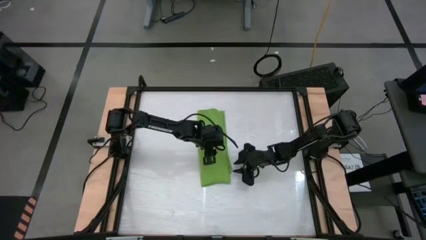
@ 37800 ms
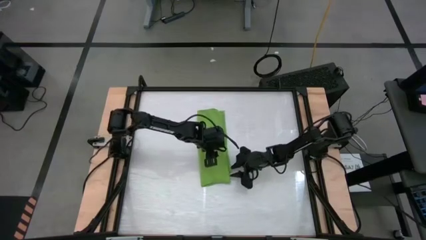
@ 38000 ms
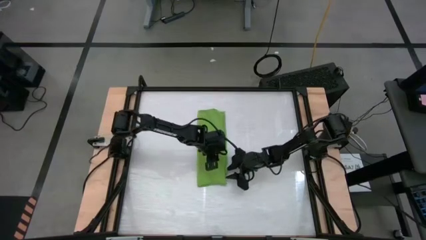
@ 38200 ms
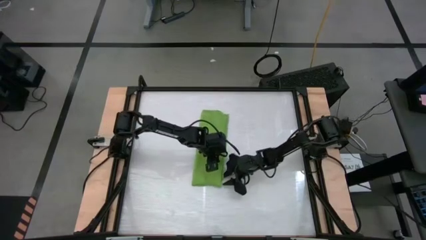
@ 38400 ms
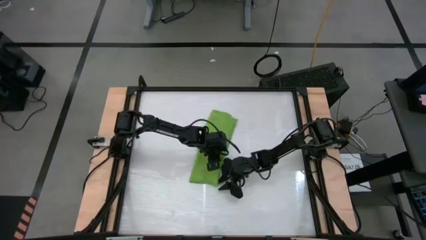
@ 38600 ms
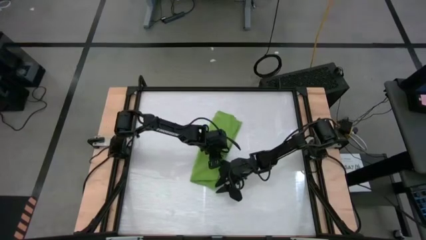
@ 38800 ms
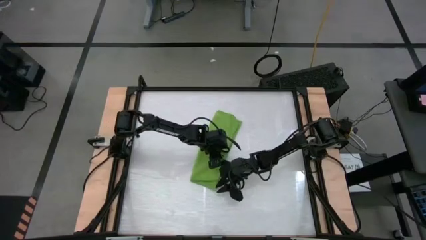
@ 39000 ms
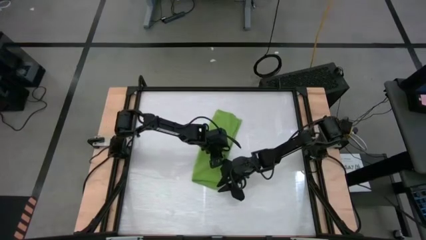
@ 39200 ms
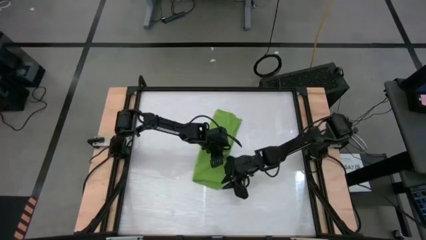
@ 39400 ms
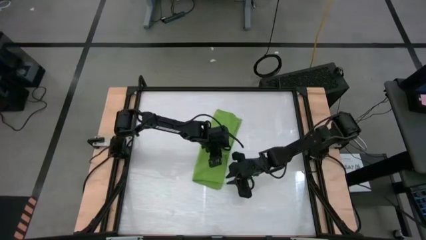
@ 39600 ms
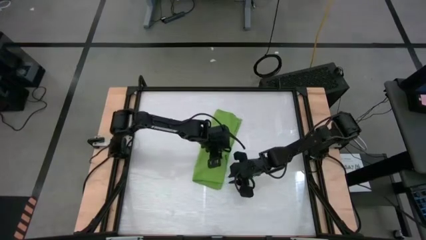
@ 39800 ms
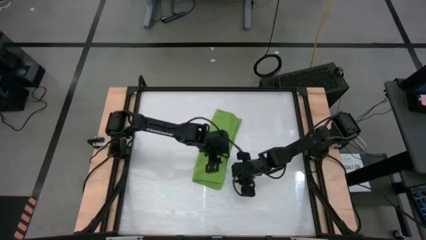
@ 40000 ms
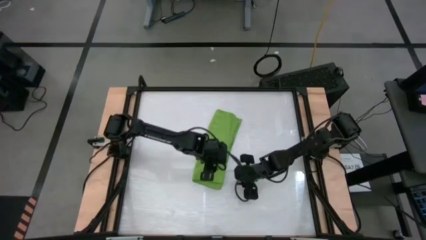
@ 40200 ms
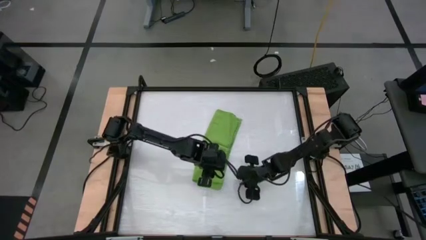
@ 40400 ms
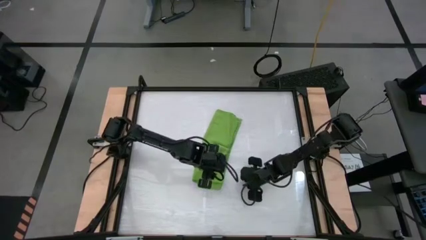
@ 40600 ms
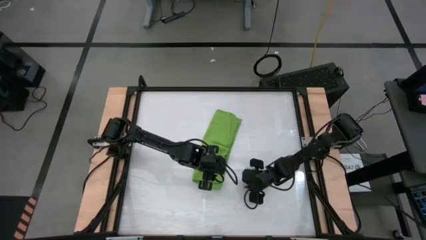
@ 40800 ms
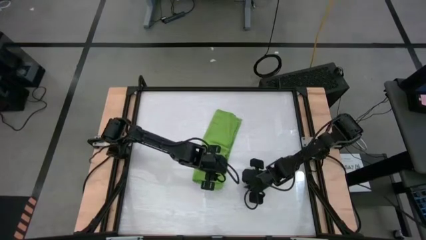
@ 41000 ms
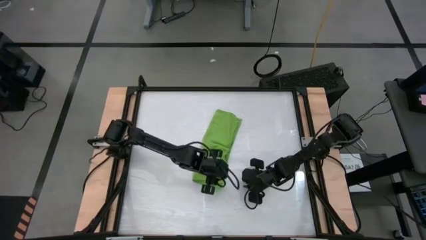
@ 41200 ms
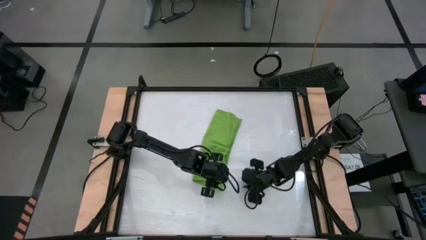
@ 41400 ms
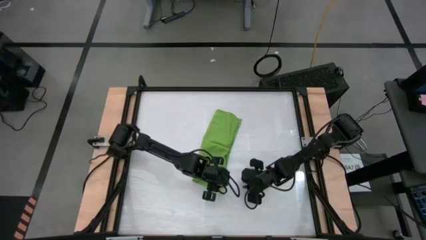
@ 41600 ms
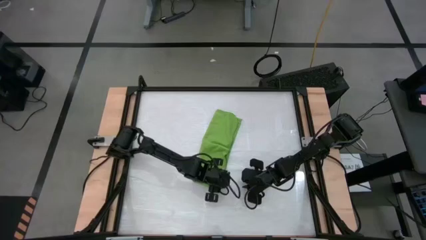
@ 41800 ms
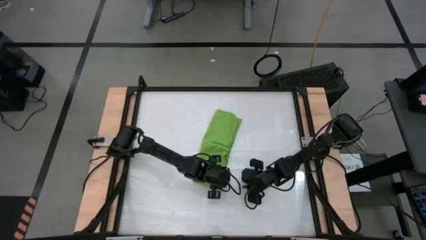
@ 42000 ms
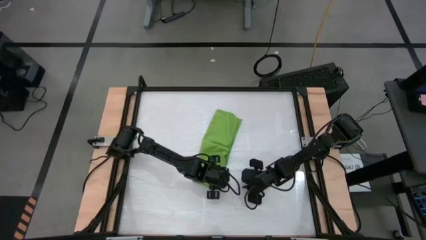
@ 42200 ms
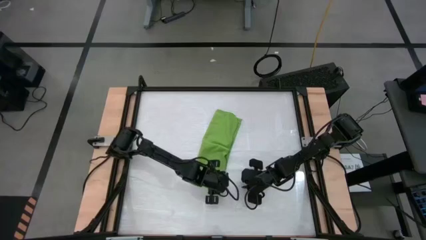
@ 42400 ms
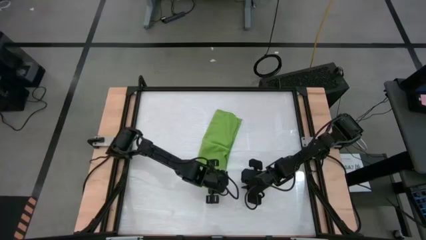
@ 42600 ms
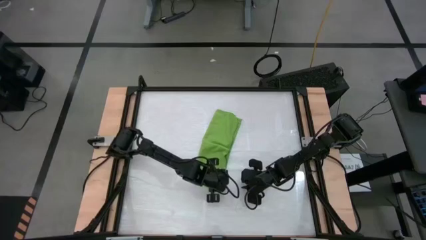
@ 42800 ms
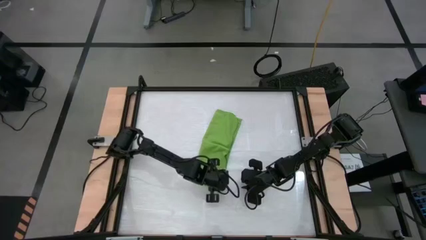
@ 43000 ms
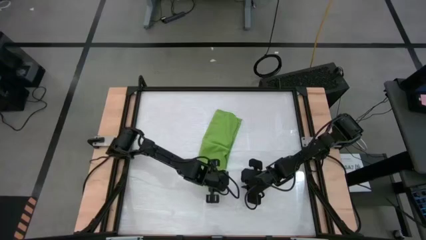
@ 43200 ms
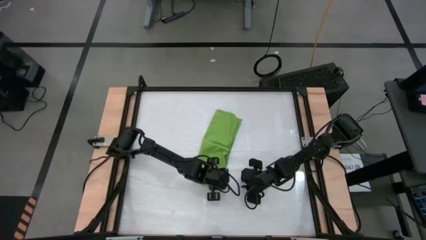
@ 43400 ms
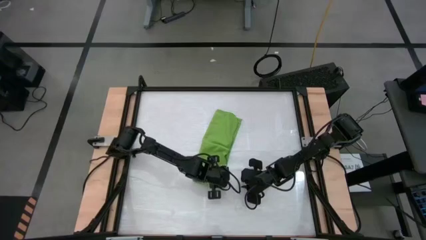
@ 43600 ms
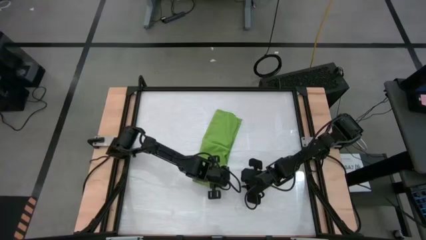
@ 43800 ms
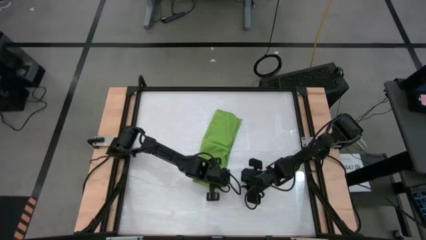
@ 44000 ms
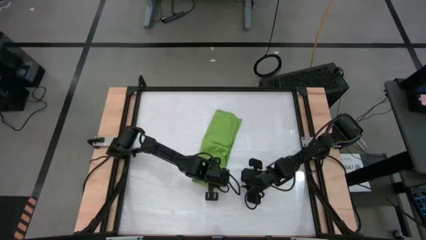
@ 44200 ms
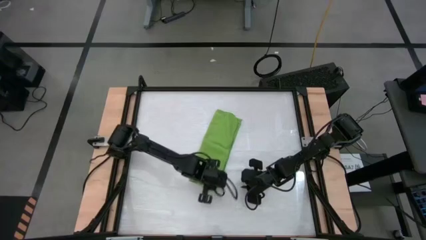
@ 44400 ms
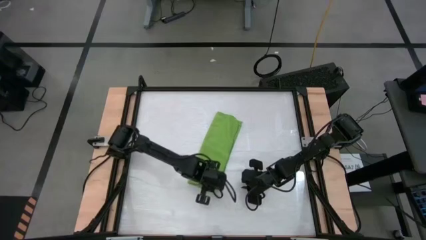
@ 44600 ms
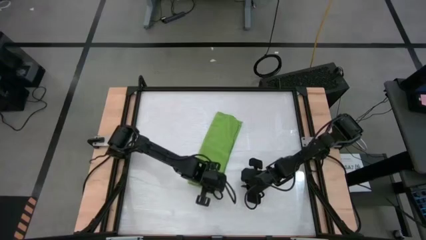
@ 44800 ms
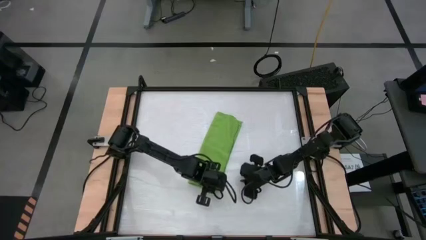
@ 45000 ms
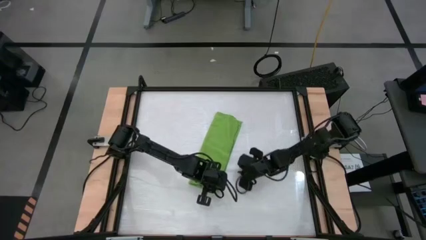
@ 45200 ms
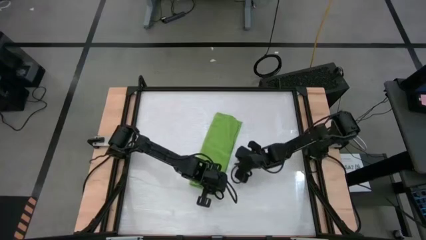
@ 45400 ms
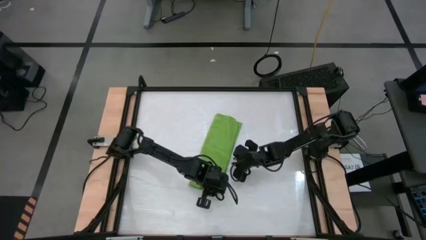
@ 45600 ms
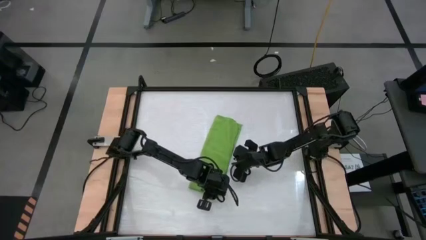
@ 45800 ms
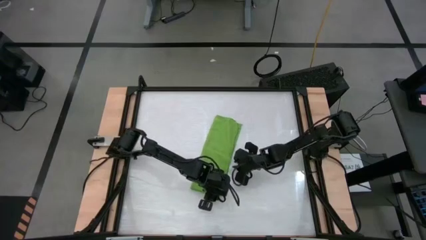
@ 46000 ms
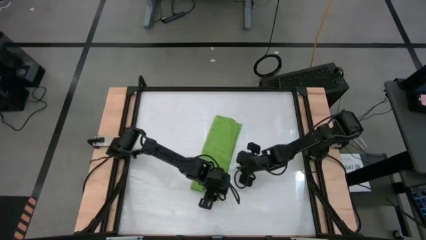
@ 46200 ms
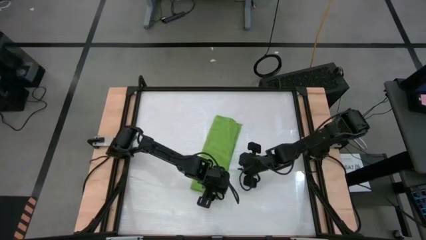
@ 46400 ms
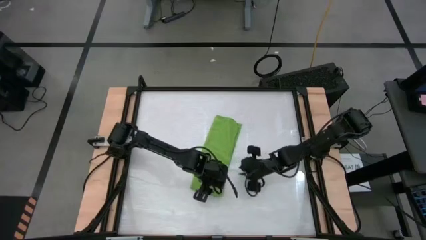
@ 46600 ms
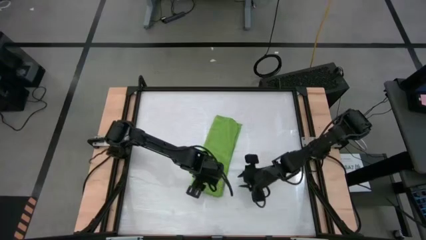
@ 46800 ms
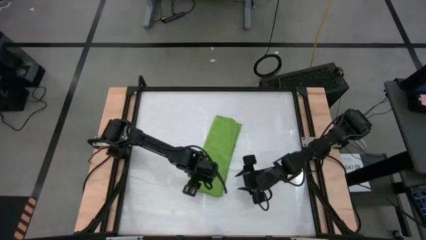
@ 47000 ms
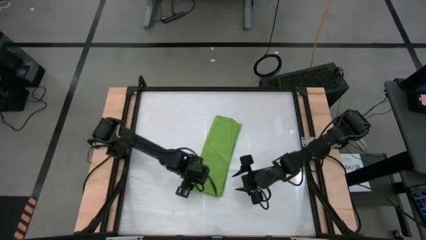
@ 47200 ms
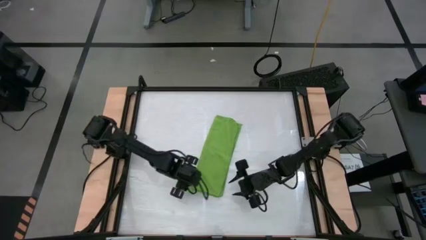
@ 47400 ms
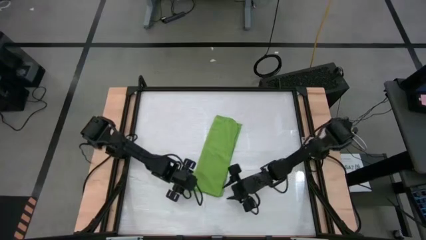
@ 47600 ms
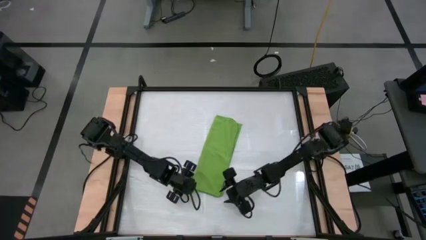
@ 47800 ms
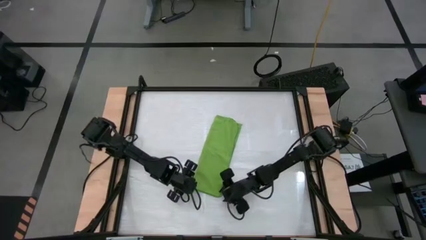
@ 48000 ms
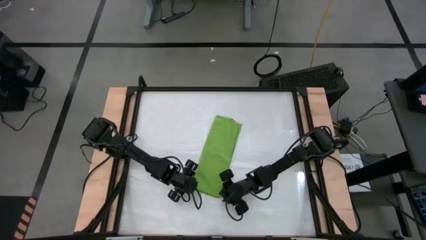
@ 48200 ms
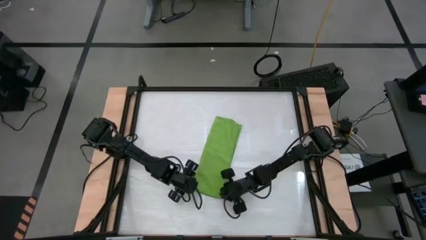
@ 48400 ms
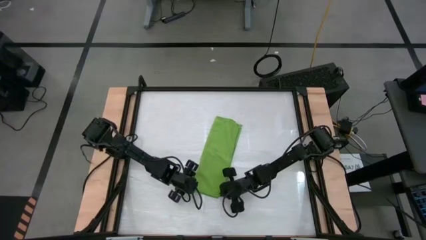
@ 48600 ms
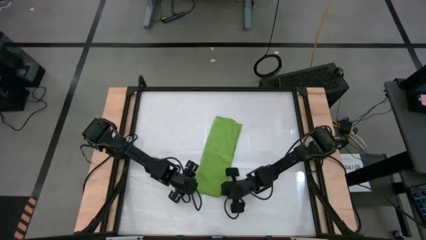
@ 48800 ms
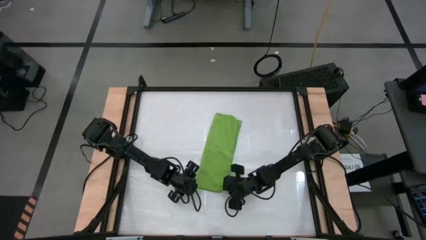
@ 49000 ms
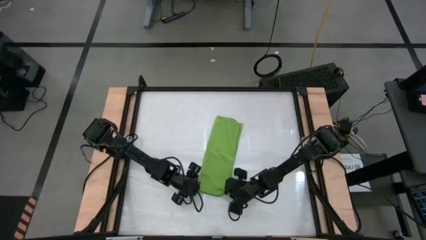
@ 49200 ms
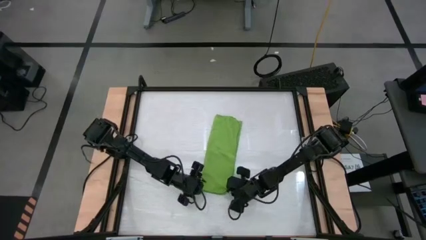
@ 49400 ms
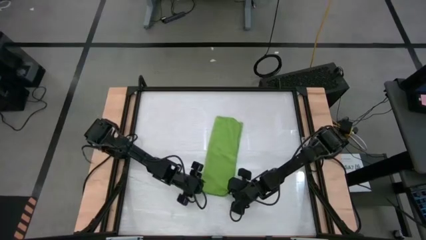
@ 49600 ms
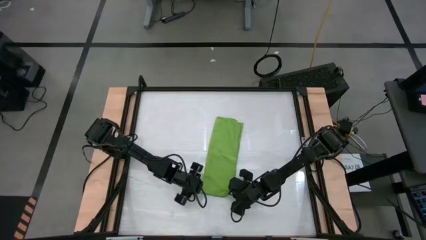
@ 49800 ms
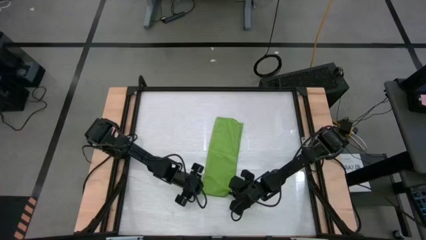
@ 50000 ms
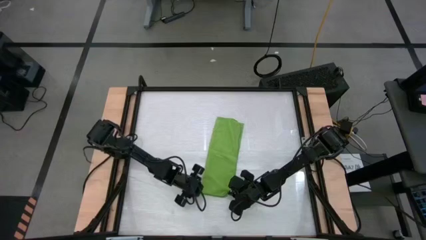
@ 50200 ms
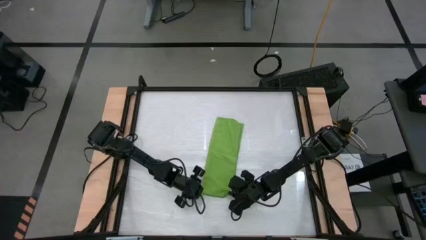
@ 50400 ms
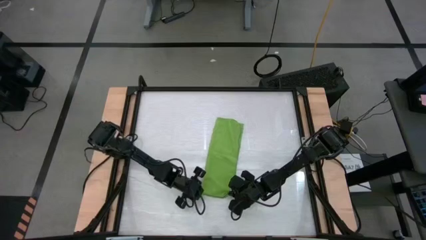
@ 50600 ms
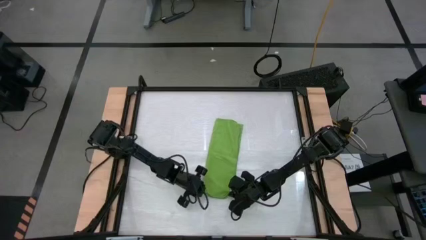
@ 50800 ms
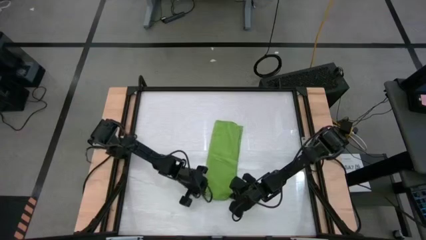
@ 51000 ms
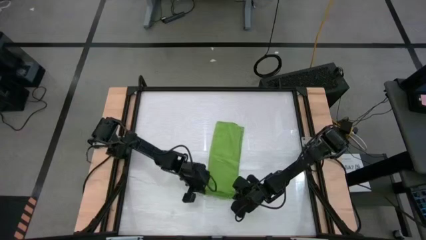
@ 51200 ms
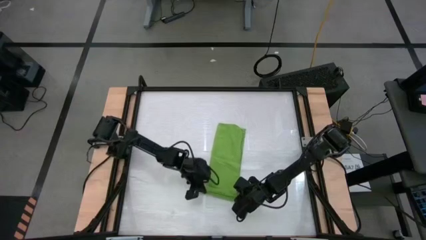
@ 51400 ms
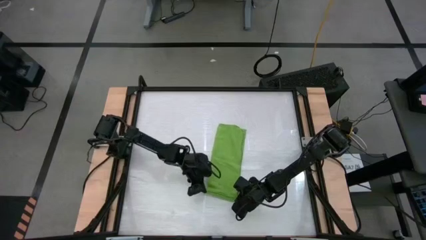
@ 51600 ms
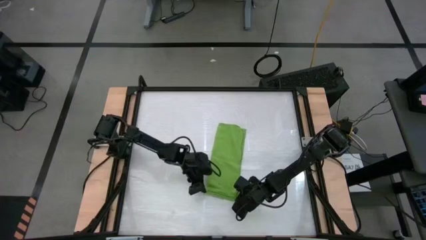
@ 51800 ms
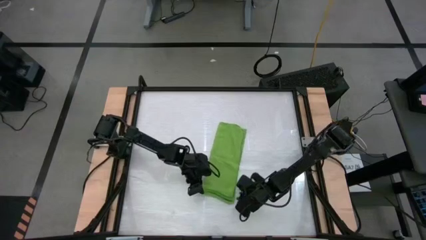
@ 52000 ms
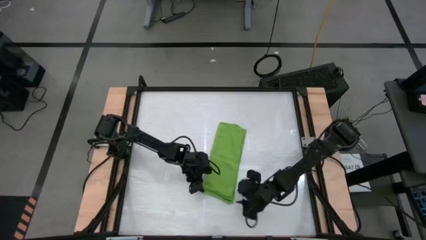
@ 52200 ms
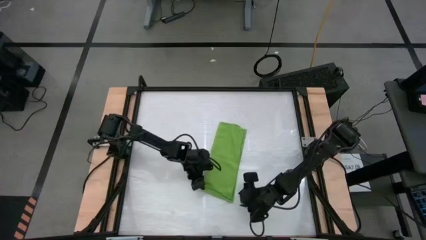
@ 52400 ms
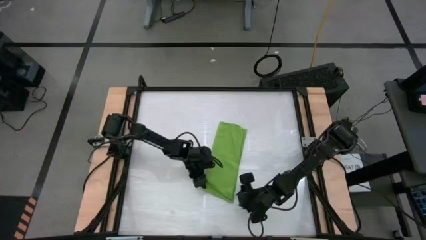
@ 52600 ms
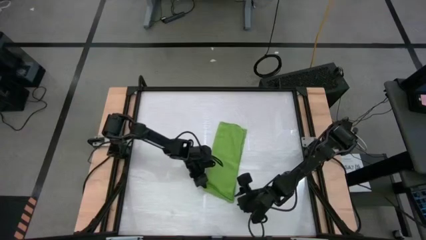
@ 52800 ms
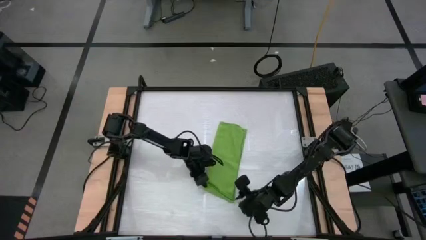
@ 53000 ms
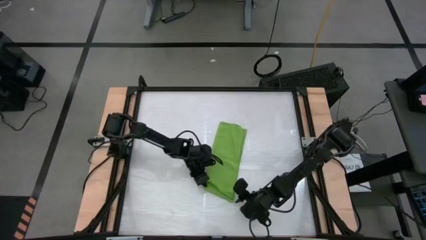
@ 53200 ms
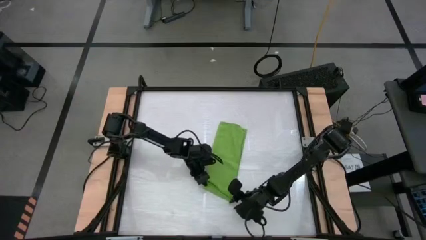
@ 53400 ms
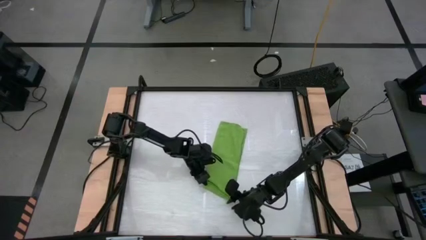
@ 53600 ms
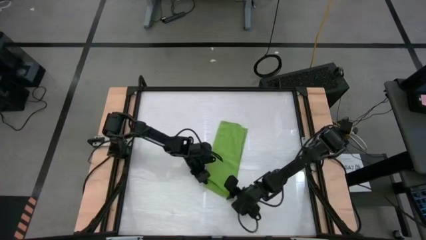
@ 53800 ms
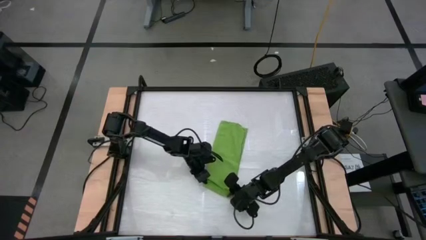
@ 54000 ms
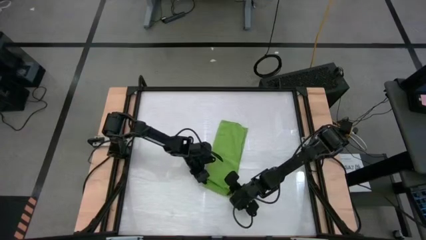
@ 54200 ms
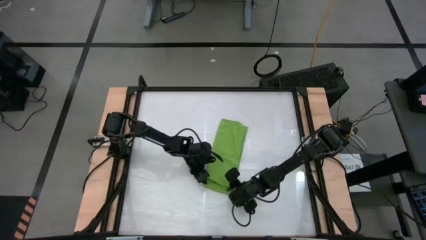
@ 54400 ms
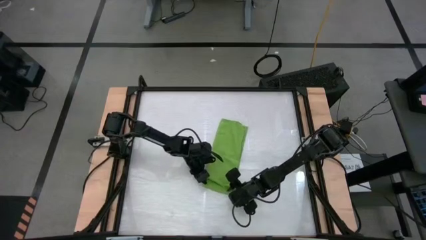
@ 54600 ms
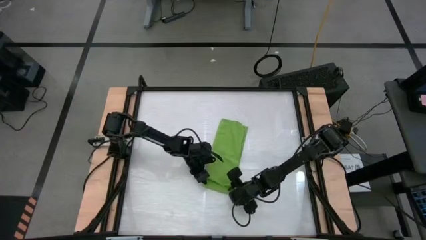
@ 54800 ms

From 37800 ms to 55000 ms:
Task: Roll towel into tight, uniform cylinder
Roll the green towel
